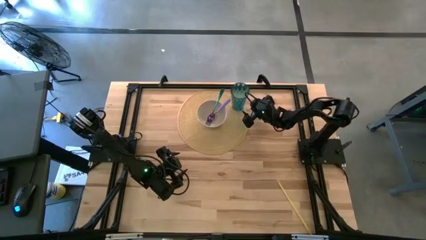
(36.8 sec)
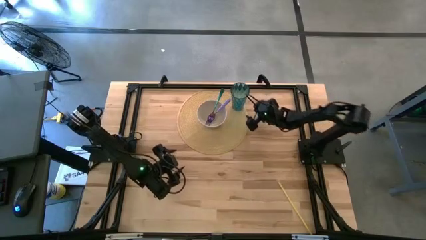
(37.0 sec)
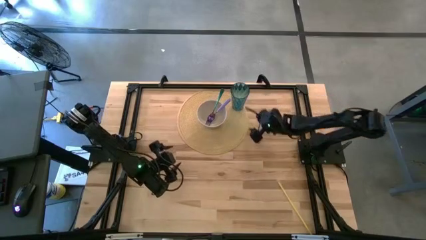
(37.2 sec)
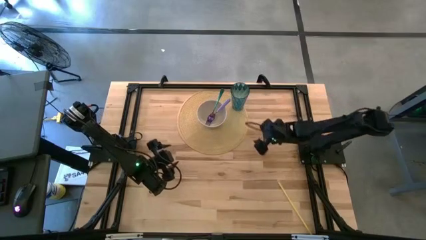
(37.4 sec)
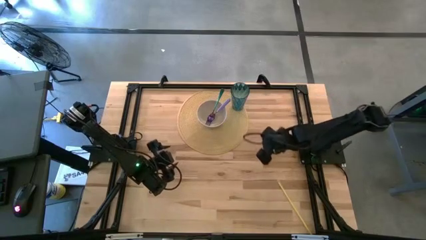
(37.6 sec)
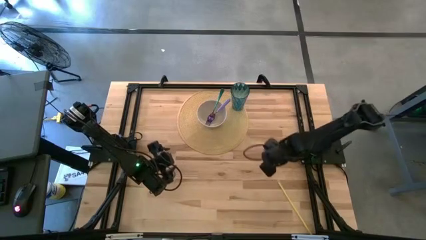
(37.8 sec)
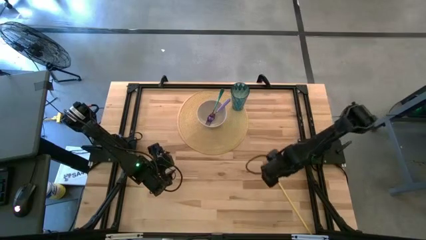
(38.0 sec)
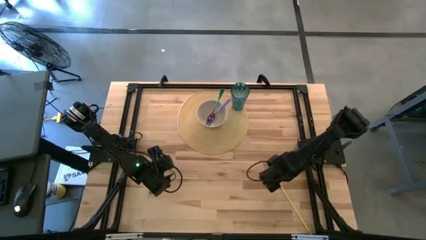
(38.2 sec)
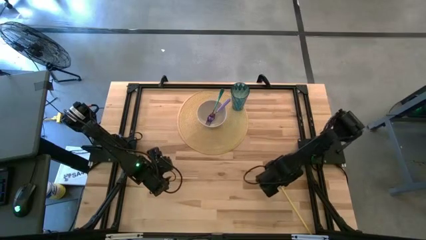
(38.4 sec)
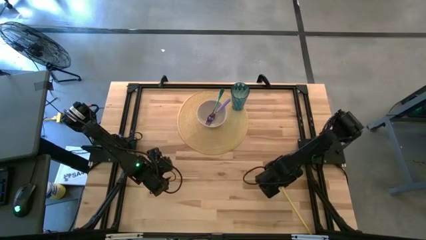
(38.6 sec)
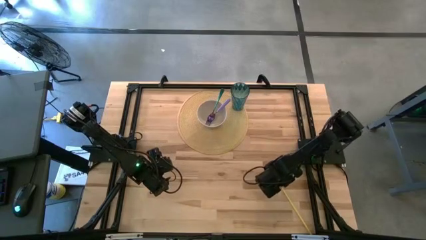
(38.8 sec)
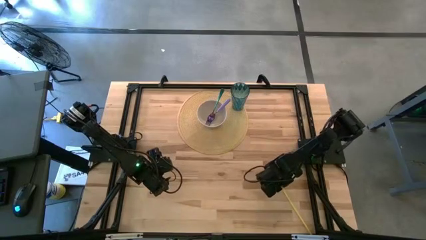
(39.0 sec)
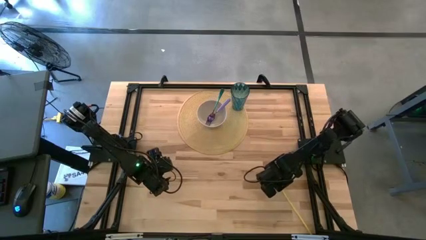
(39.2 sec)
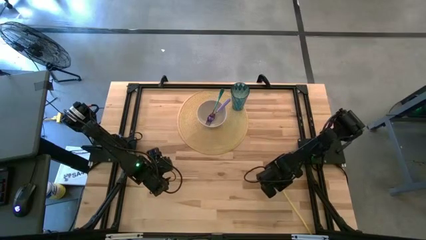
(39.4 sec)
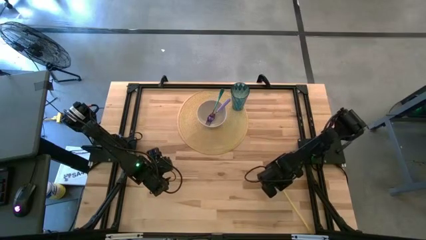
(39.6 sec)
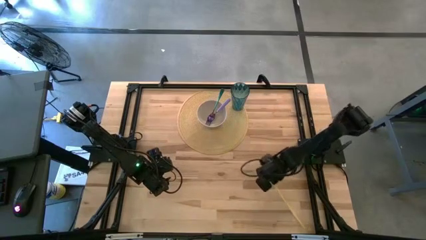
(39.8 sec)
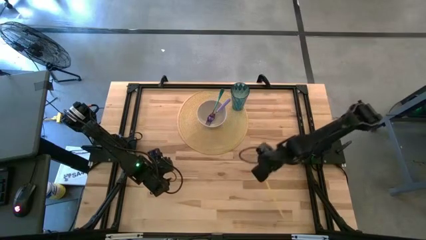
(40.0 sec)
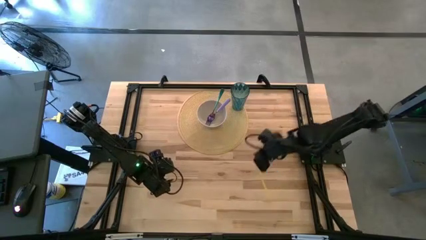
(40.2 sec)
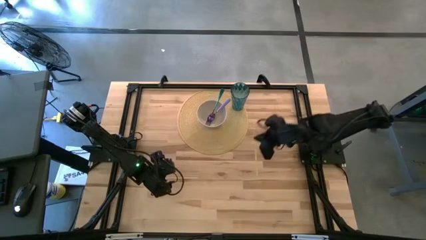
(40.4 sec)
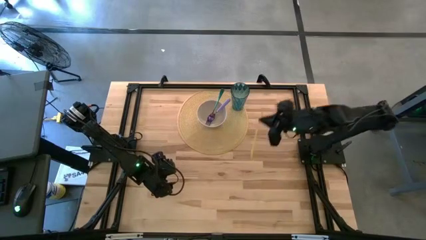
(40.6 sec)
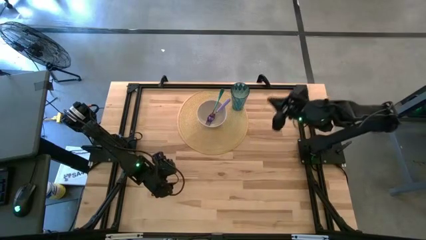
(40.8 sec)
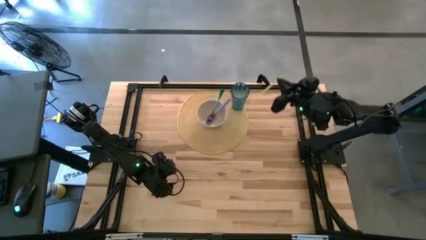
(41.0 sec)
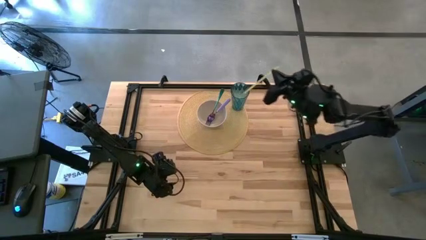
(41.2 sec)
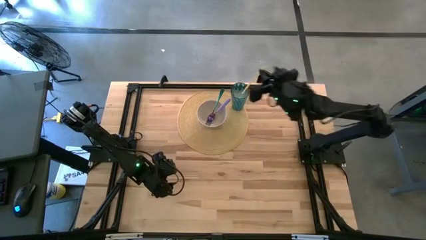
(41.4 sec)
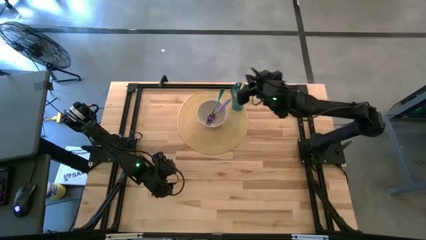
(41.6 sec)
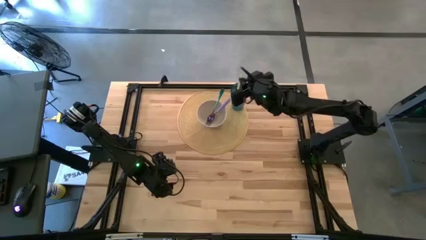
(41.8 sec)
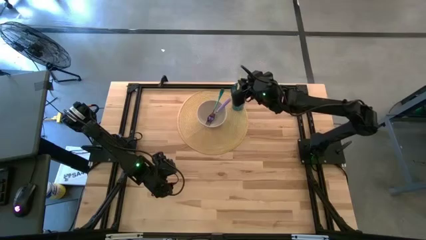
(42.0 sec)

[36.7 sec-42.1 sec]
Task: Pick & Place Utensil
Put the yellow straw into the blue cup

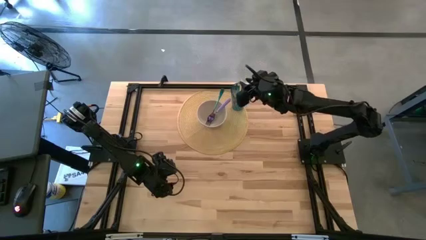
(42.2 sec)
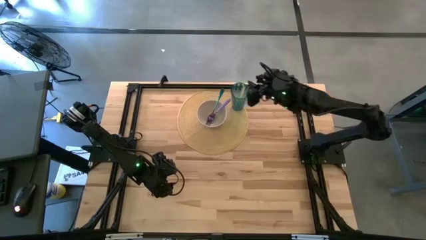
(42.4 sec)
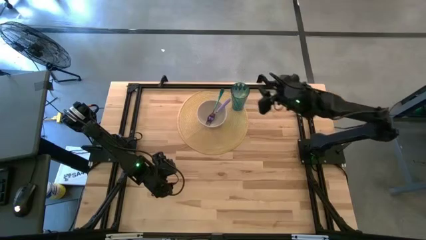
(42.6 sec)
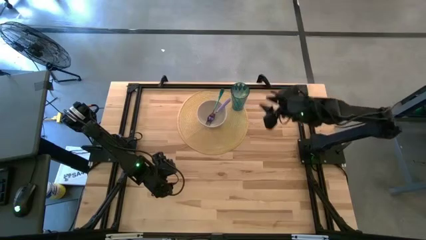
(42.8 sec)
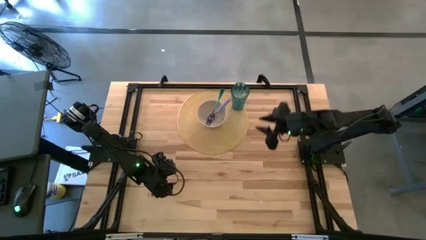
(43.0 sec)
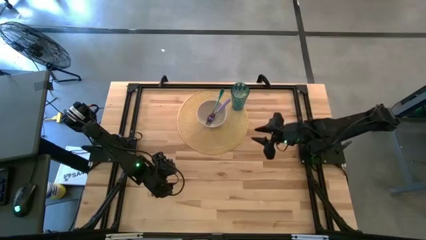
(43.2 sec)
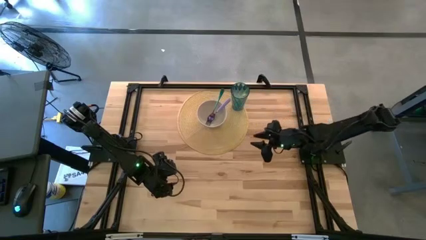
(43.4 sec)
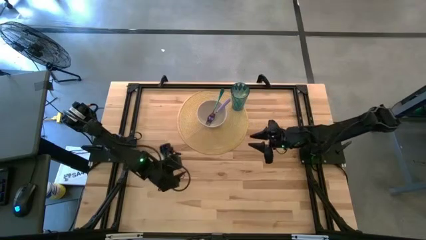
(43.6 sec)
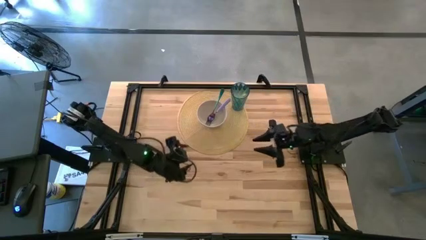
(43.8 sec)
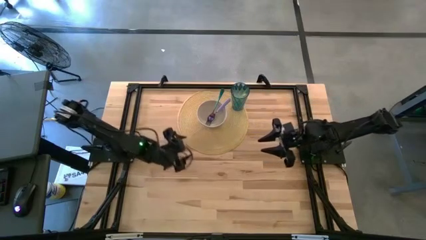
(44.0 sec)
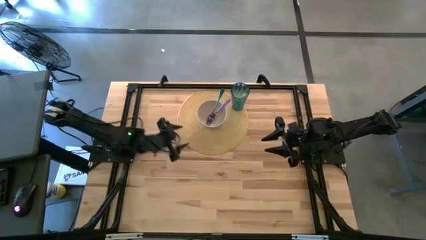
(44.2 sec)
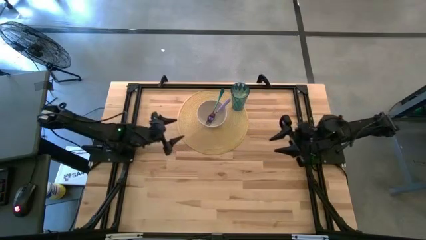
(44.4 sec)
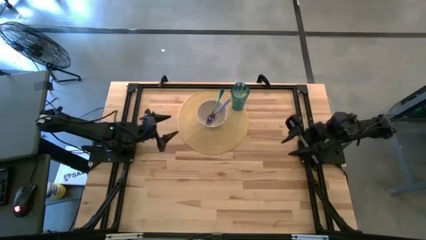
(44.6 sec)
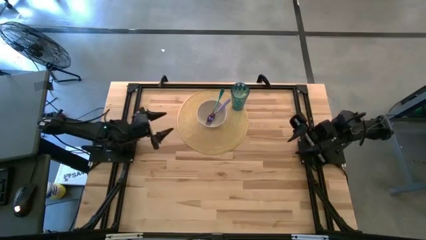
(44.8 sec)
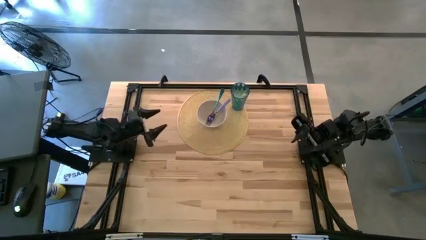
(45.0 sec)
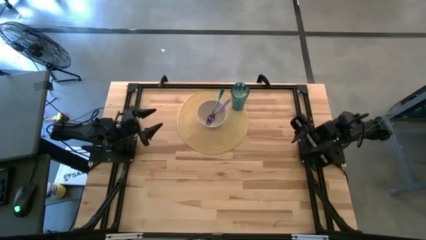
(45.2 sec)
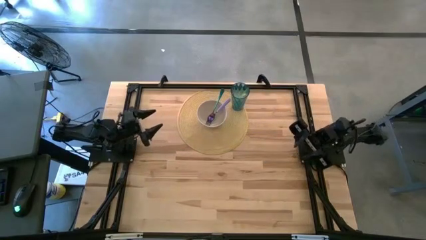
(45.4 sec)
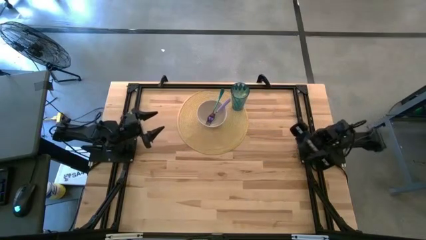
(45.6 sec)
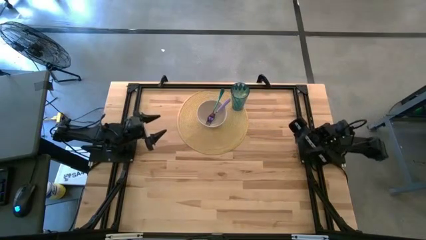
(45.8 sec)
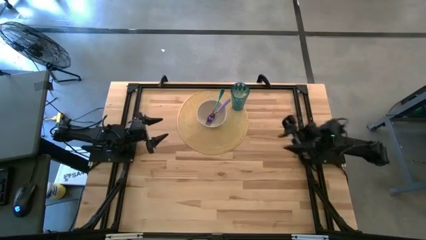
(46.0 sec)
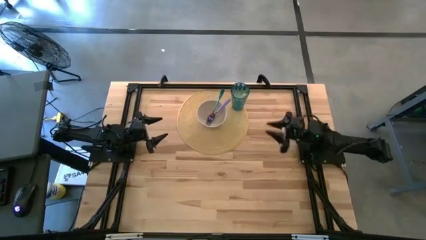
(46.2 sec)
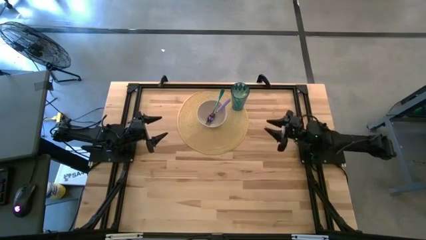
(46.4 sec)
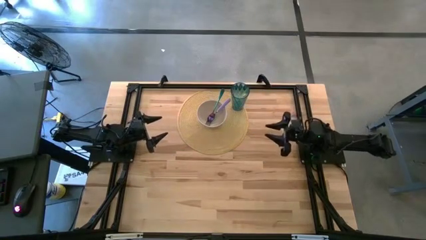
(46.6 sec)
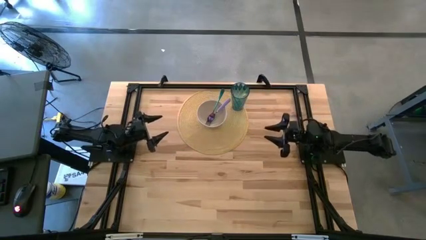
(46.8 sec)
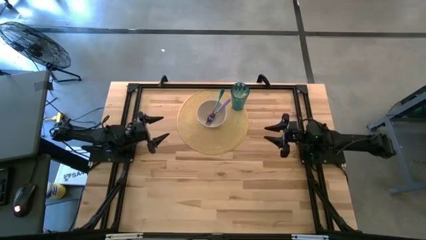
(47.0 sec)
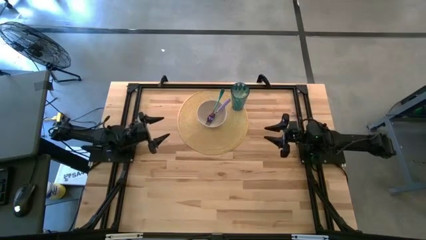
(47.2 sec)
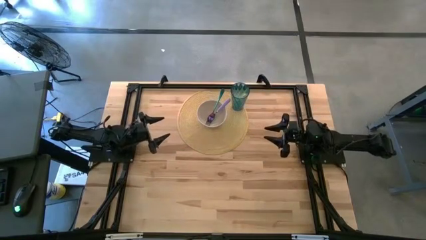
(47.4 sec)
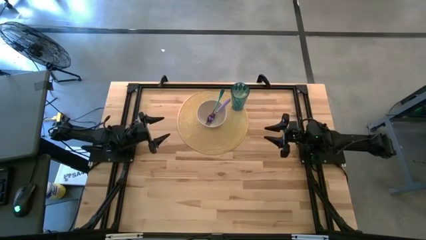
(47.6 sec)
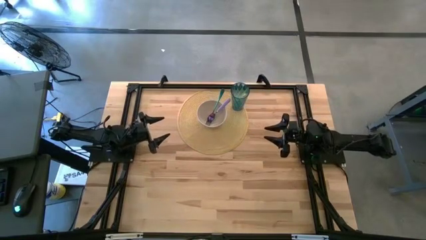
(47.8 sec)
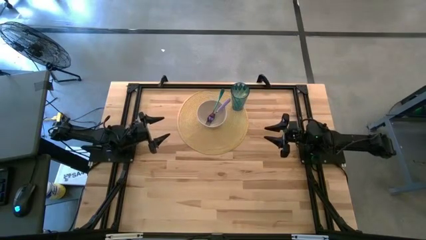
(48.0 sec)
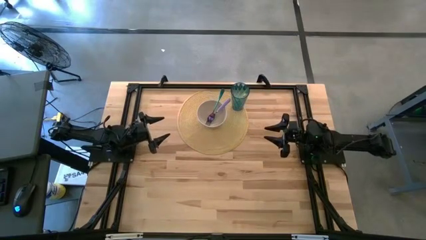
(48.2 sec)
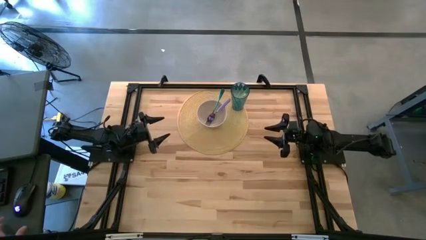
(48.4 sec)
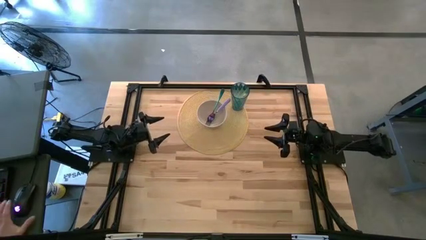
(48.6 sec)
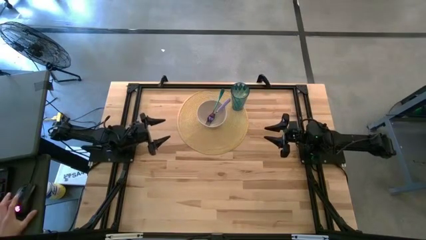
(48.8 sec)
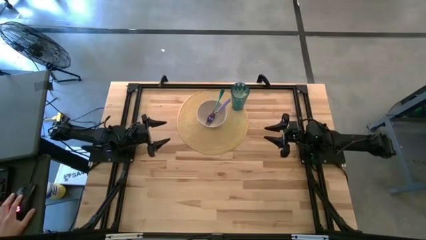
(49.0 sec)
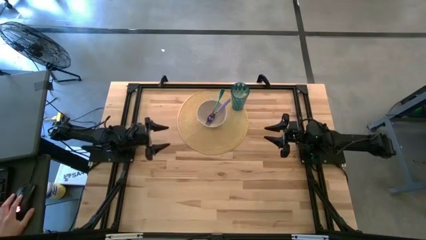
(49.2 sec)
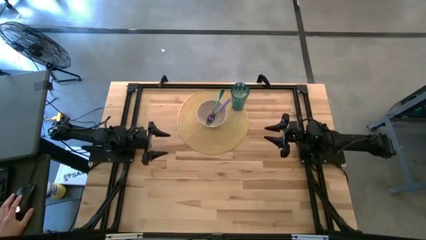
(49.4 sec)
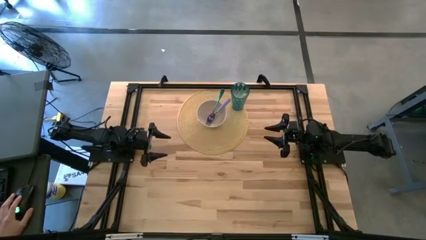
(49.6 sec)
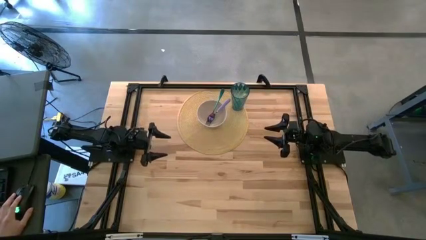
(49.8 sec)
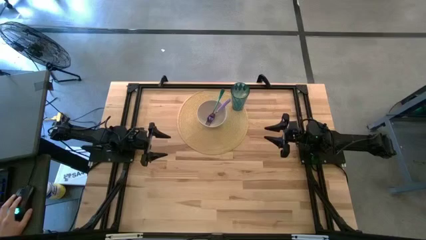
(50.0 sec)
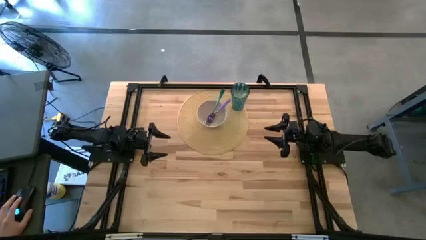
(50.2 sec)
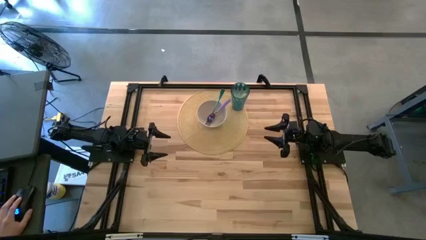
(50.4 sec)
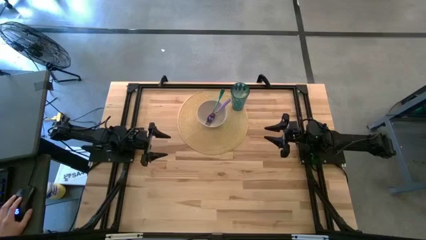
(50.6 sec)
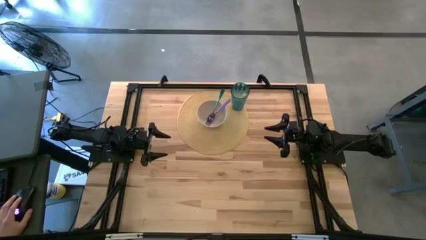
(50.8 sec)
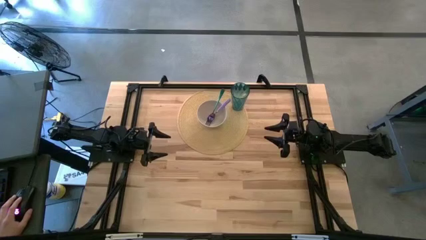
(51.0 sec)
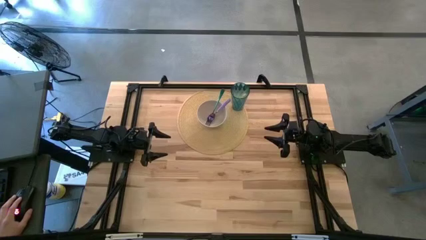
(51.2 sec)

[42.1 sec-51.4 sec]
Return to Home Position
